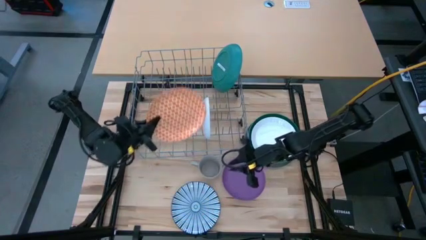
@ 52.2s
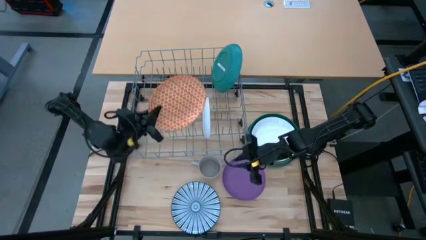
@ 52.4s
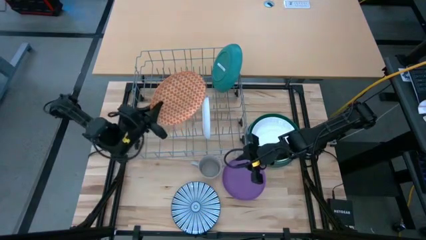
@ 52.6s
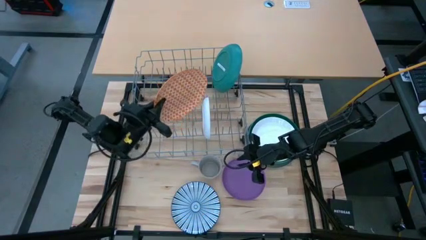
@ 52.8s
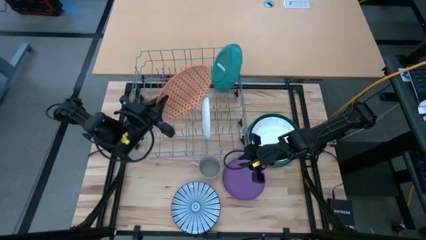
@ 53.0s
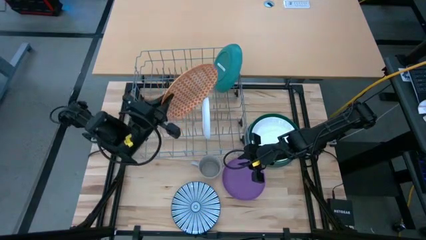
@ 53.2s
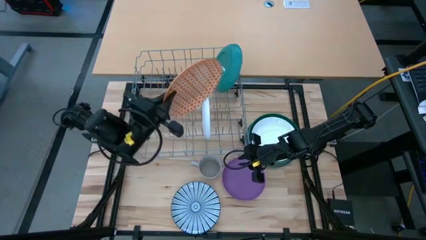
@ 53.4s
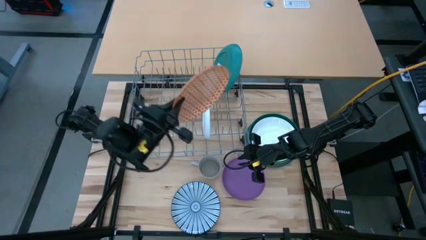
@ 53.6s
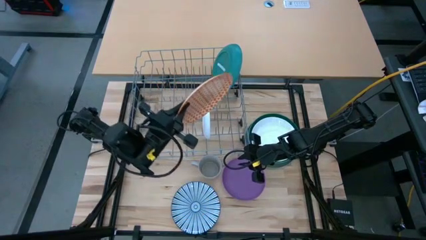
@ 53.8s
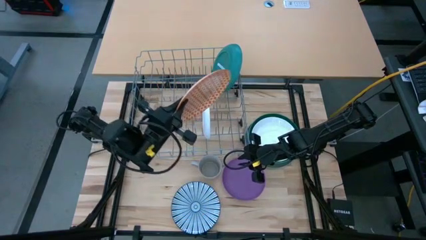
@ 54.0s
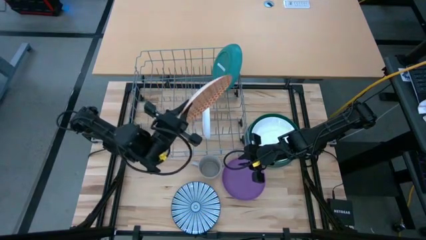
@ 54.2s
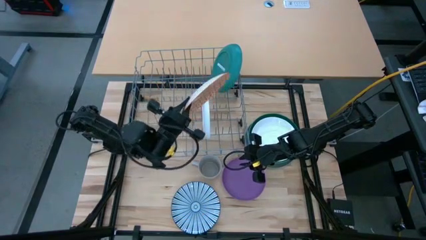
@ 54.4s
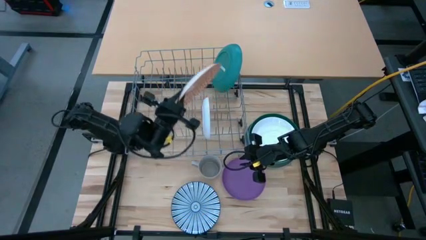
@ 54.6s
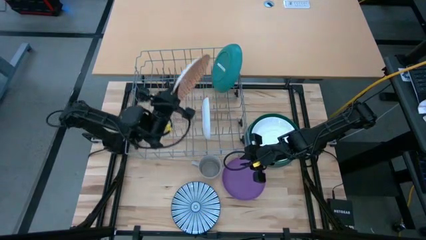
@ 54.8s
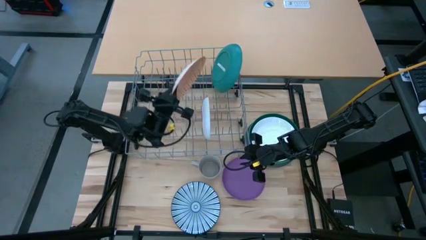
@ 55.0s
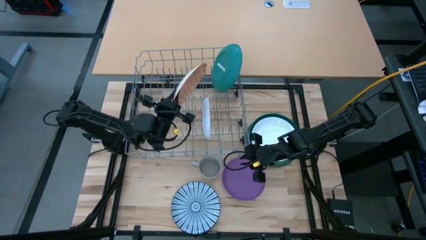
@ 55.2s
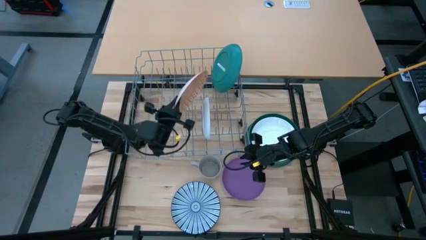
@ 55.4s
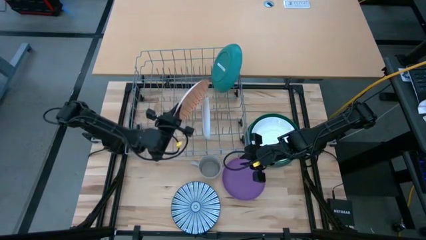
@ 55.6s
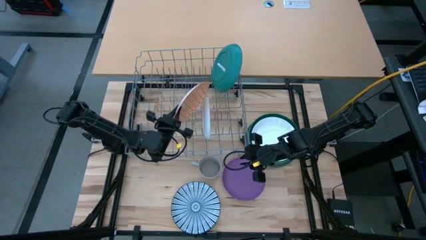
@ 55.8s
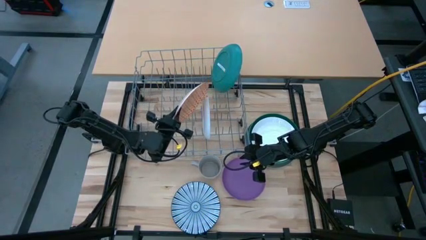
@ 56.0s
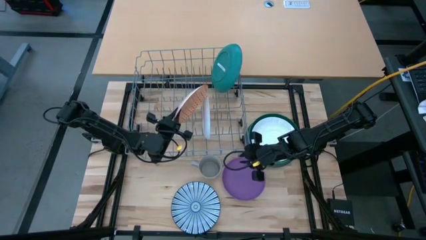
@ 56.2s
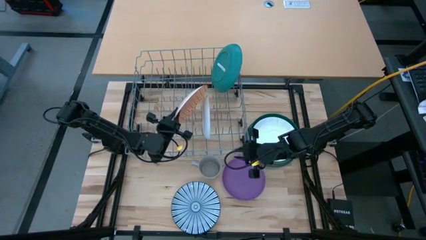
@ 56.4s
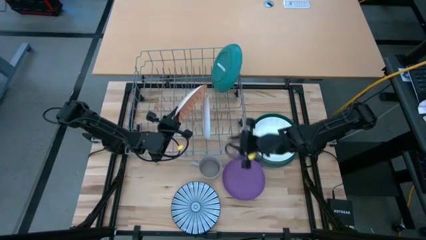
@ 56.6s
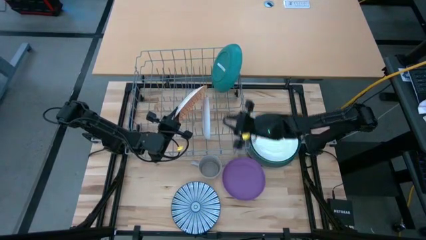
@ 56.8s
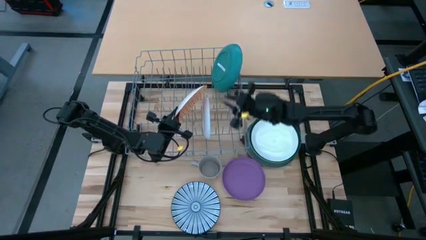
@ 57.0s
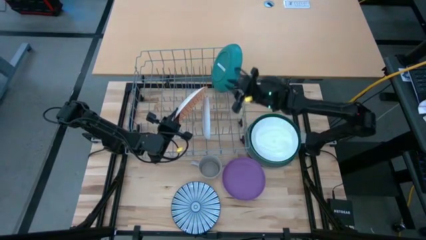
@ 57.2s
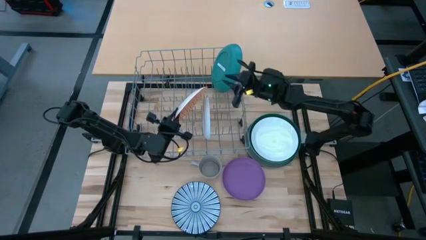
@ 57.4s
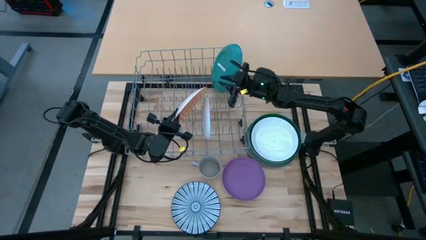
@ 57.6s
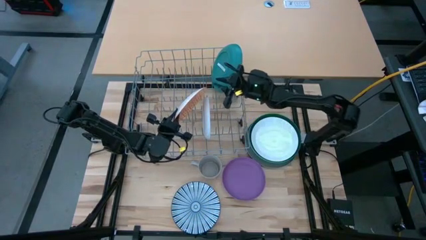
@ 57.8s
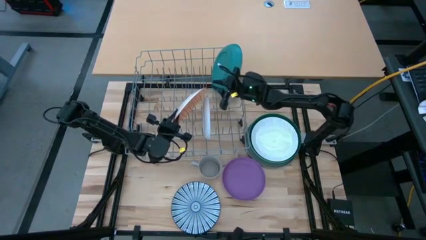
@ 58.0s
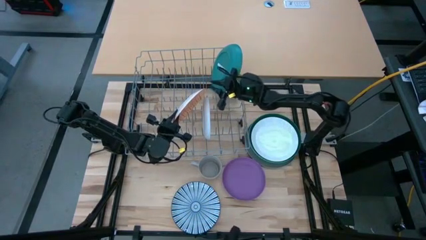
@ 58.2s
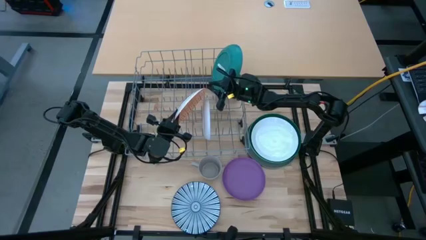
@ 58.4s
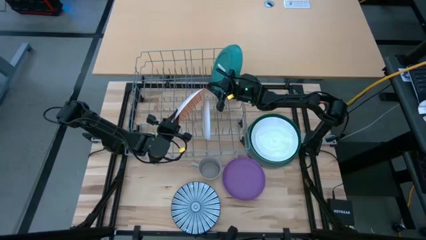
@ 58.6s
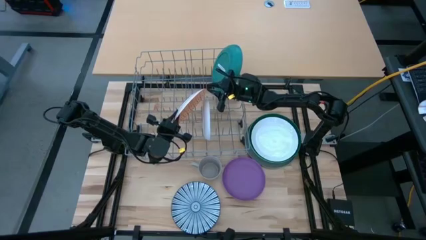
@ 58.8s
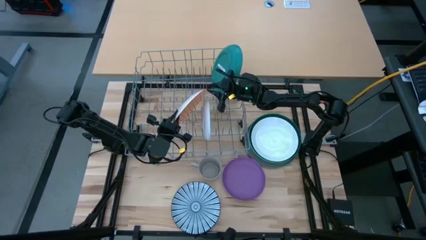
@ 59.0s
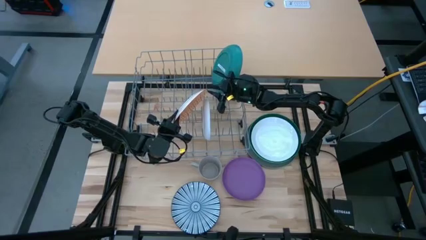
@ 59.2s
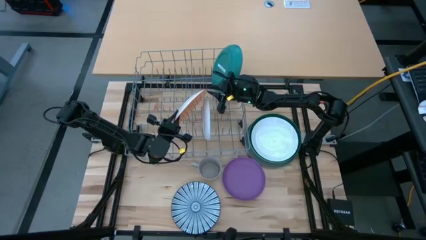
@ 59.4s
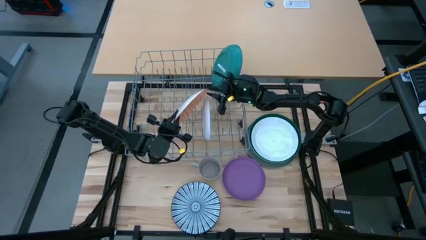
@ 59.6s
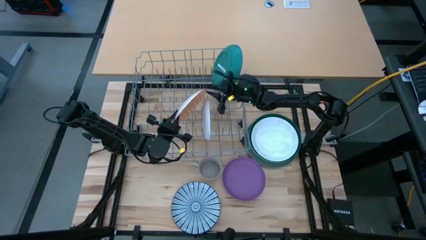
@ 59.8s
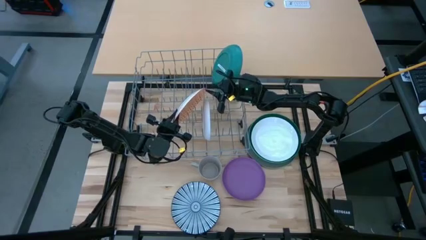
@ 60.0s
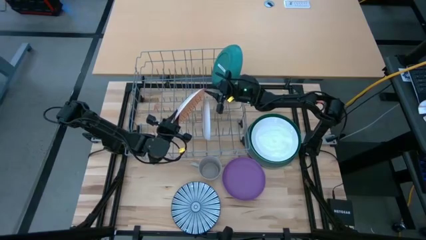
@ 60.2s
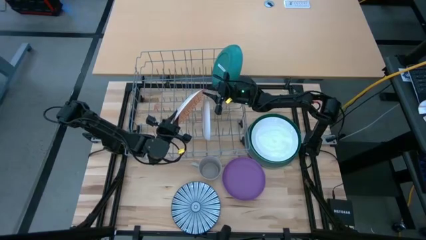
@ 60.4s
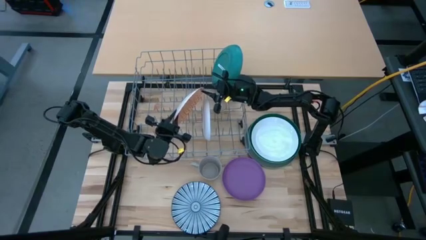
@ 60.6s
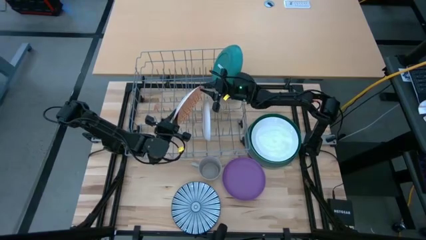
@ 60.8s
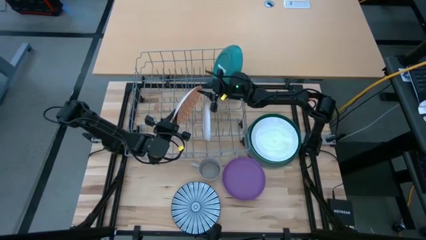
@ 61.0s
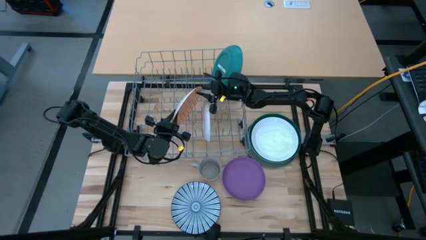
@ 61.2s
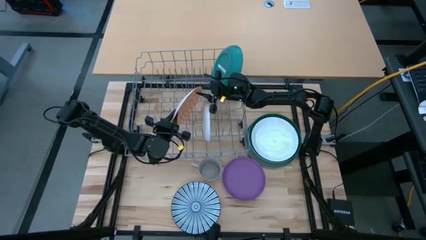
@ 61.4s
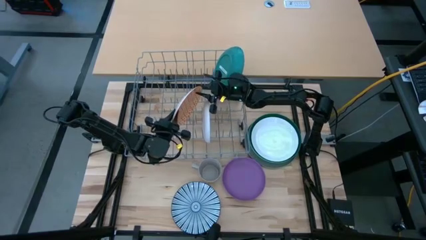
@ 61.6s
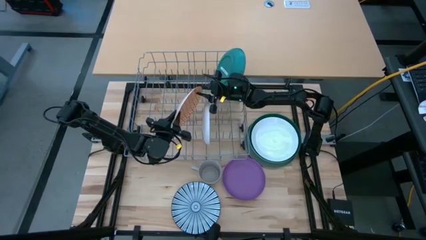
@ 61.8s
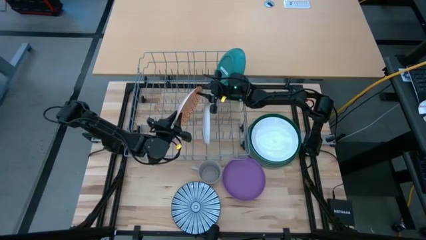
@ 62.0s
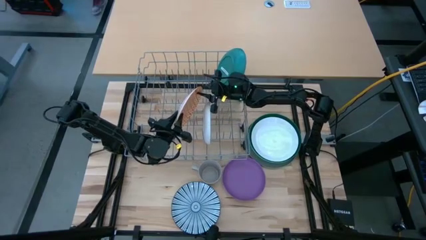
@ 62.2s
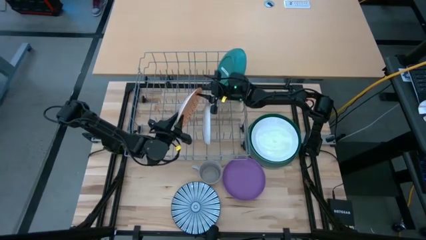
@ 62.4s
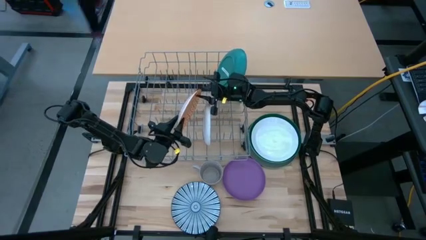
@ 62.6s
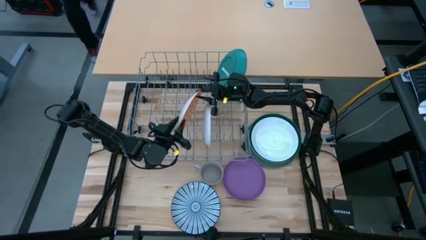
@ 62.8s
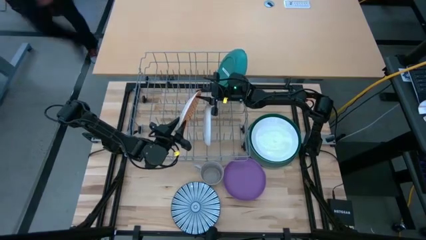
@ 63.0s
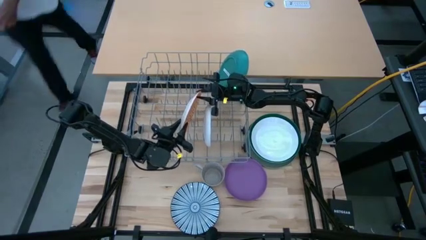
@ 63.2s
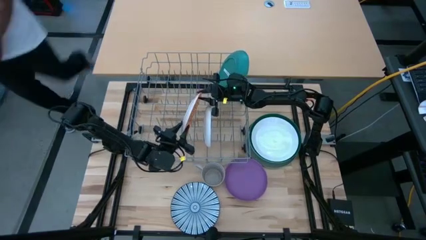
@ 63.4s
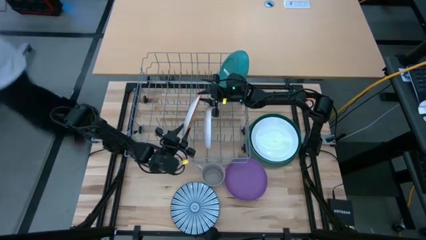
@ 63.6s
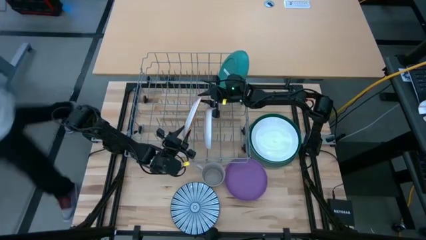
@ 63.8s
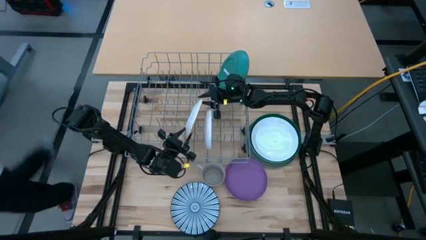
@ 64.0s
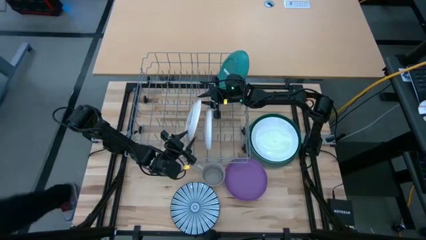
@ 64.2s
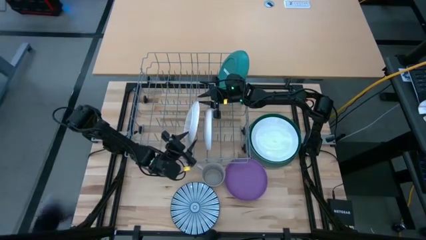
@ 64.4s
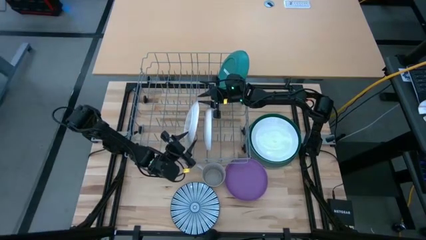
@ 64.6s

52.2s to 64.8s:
Task: Sort dishes
Put the orange patterned plate in the dish rack
